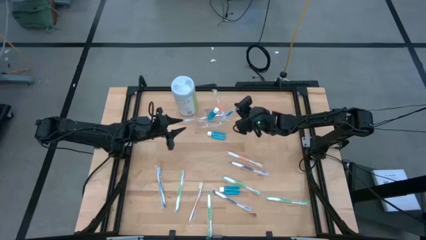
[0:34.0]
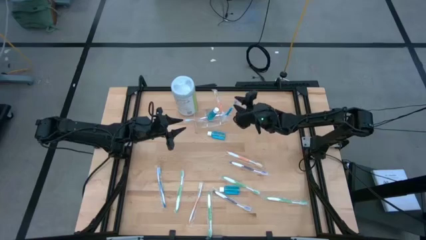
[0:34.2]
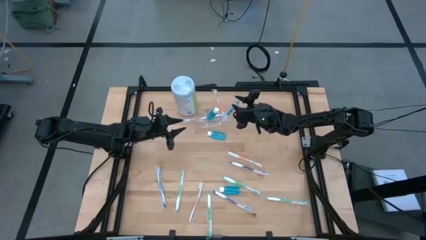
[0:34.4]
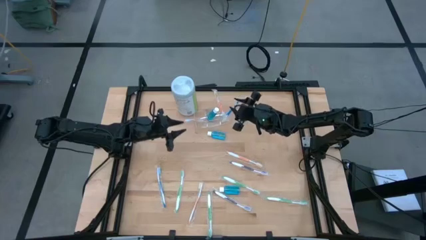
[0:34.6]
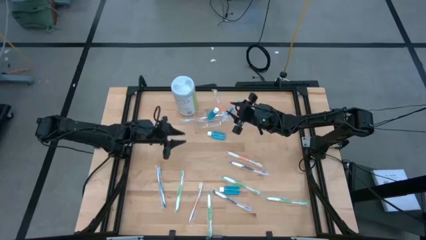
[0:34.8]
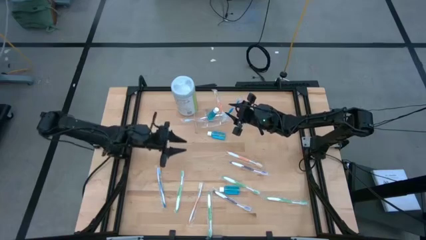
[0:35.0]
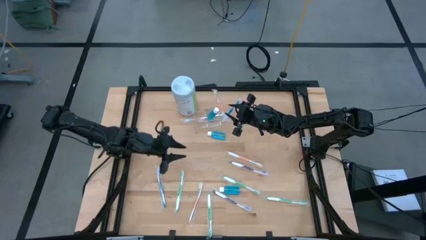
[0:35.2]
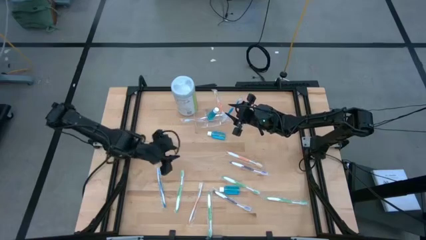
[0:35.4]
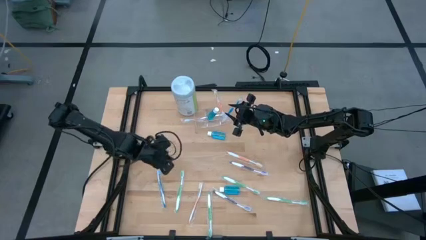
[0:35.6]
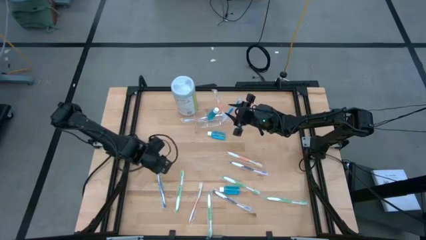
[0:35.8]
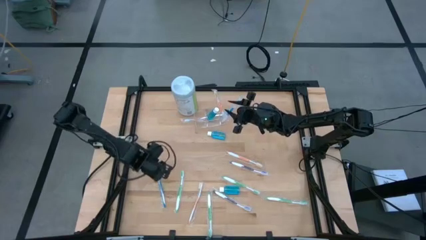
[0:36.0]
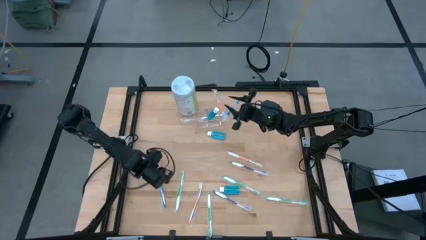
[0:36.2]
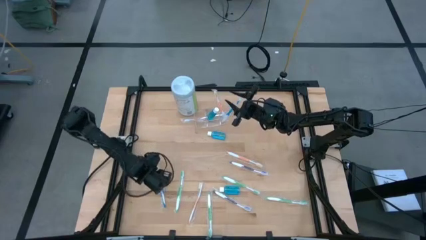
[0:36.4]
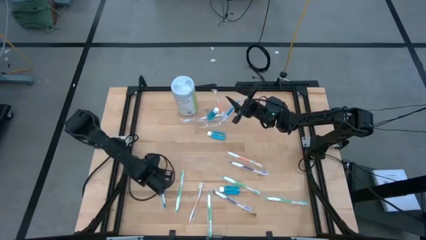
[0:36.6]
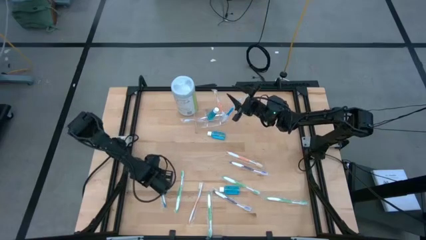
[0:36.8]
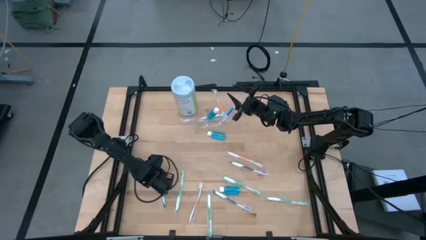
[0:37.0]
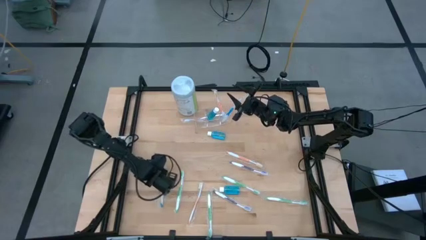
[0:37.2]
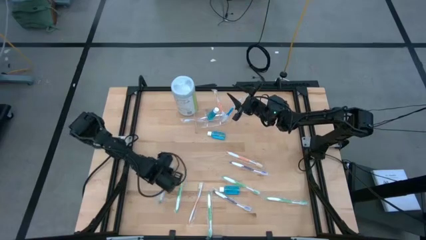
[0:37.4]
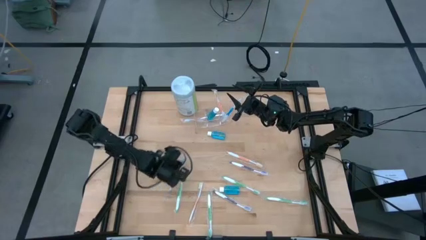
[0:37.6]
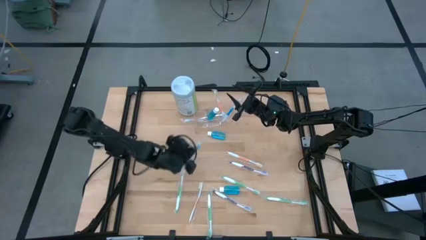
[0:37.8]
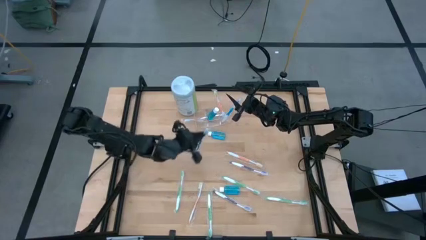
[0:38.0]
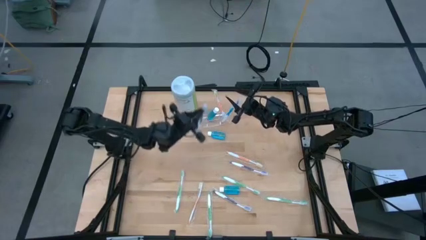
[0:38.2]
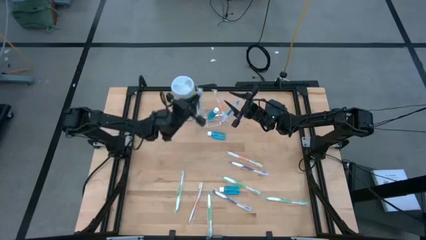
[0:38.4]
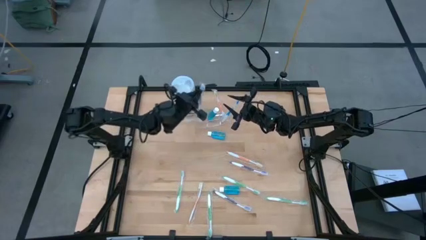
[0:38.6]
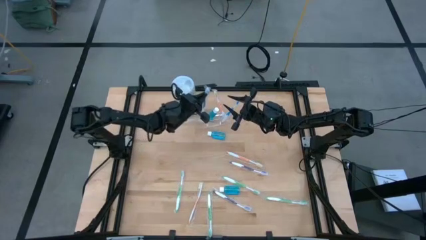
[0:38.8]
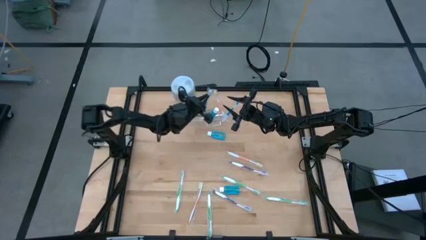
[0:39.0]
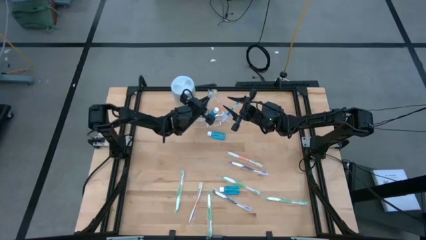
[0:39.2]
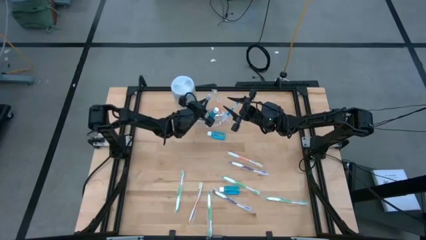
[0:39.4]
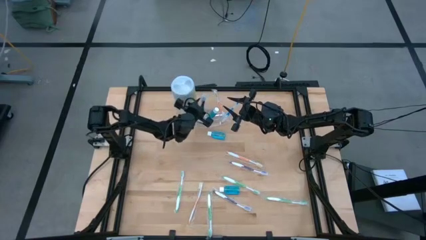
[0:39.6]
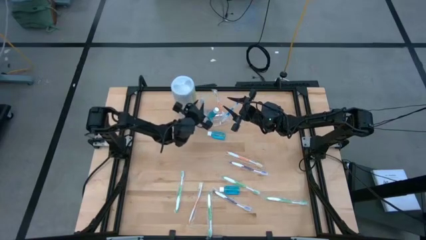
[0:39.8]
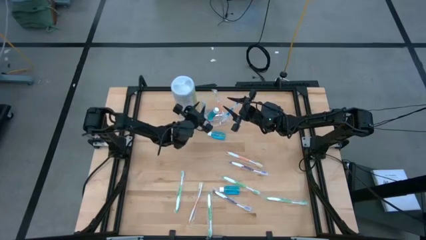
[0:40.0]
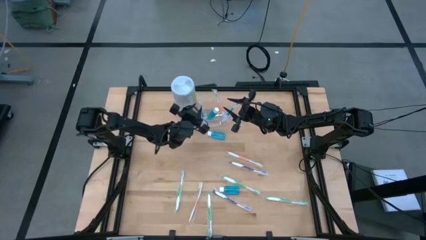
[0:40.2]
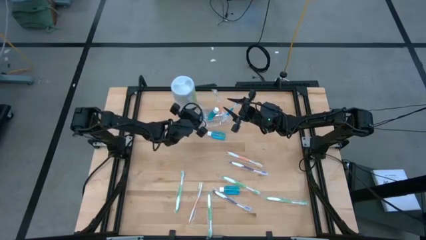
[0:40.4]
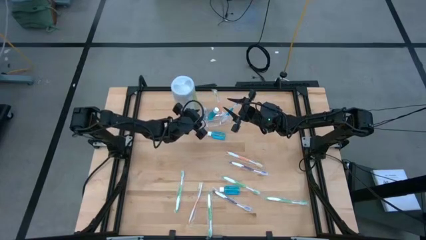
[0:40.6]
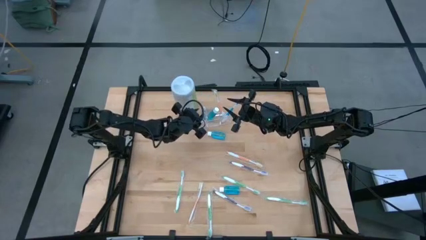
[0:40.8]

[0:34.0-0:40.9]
Task: Pick & Place toothbrushing station
Put the blue toothbrush into the transparent organizer

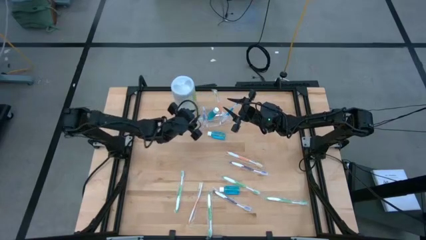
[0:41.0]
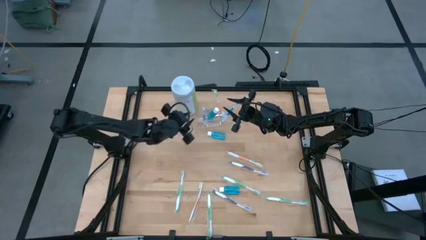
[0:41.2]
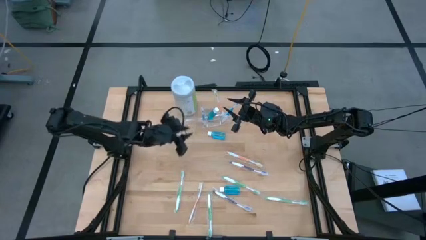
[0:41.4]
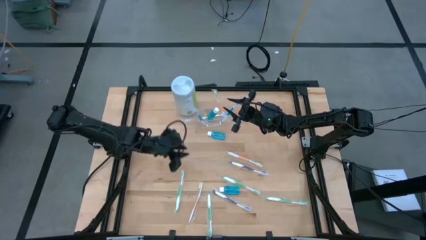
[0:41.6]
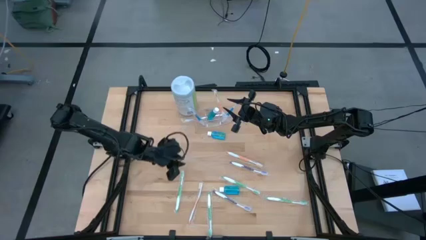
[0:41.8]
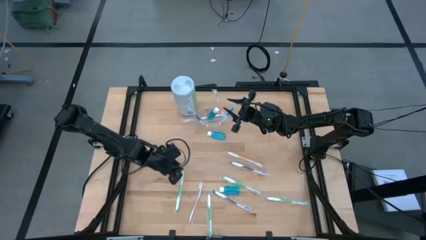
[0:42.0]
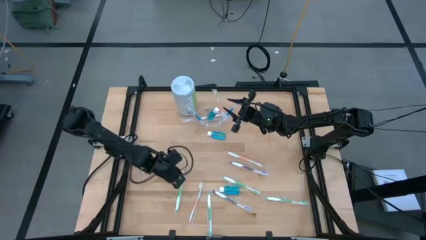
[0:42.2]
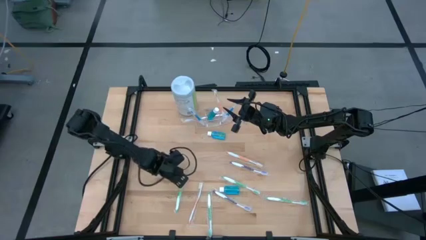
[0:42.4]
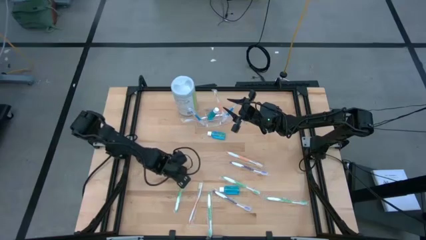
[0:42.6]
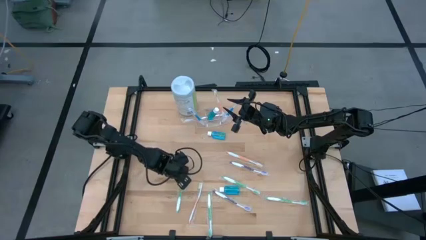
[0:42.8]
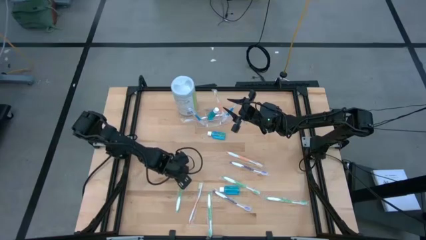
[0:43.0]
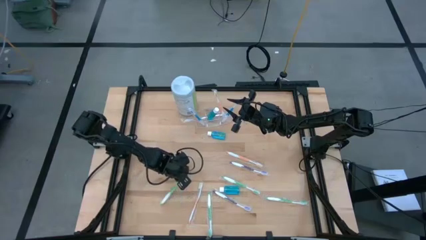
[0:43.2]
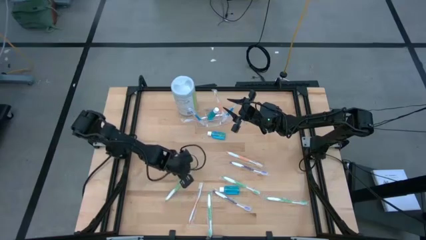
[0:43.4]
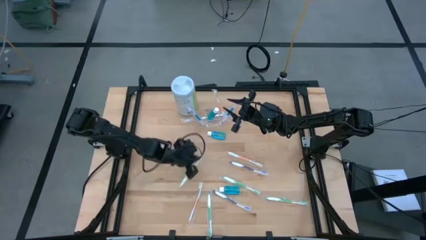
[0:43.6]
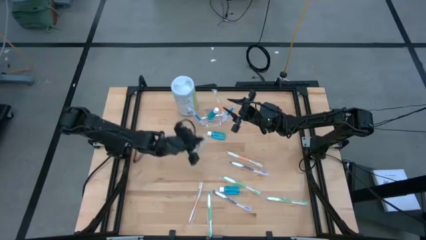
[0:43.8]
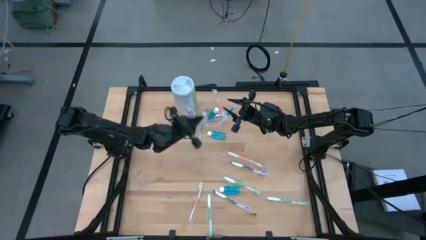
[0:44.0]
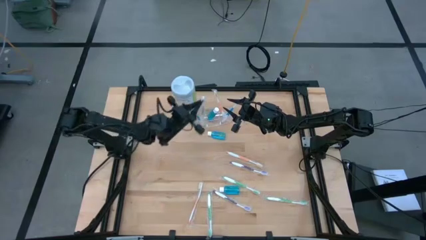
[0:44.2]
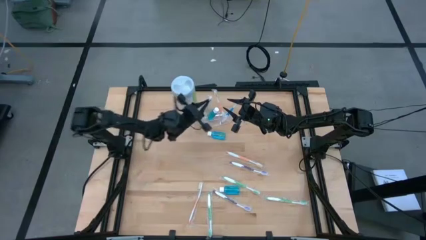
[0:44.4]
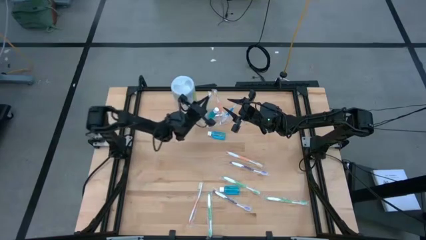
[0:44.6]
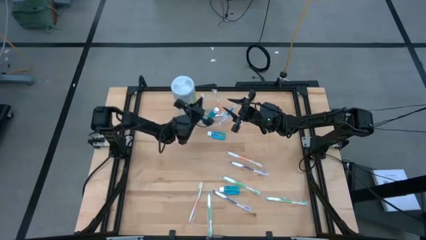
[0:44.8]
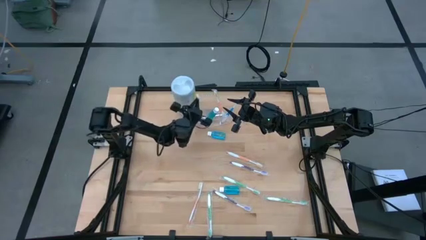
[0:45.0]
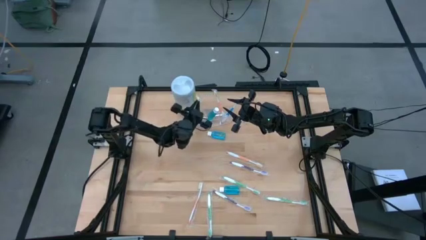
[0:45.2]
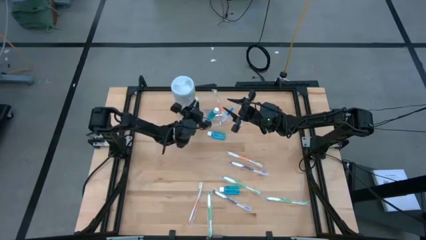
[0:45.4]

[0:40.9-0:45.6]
Put the green toothbrush into the transparent organizer
